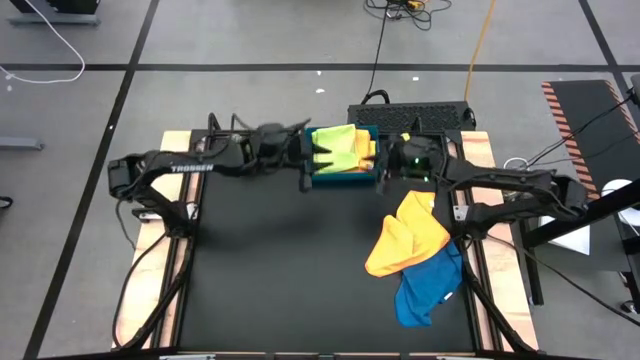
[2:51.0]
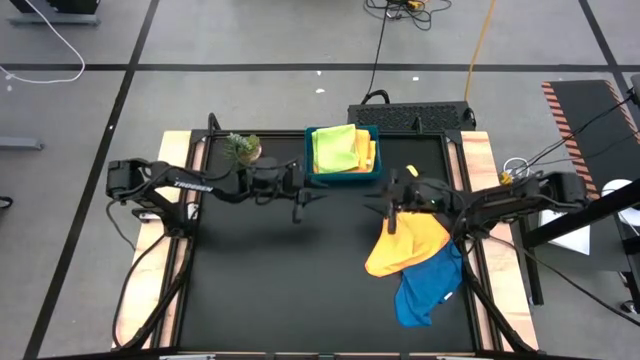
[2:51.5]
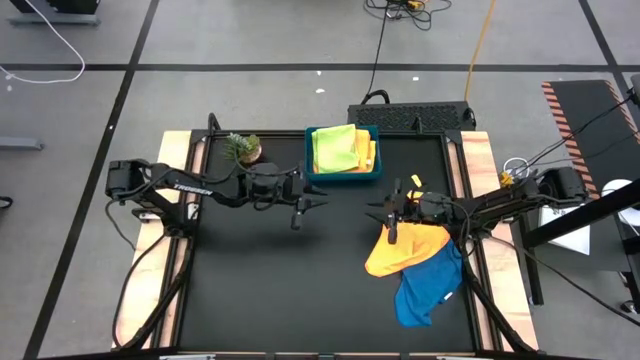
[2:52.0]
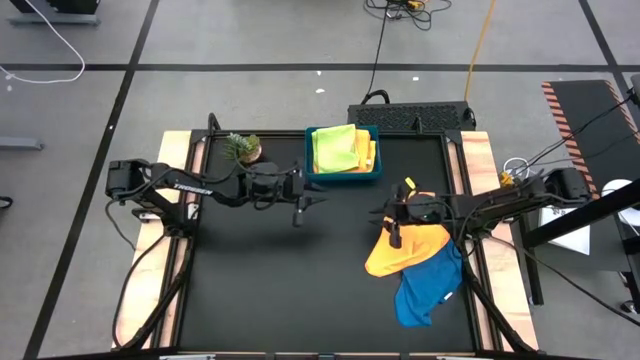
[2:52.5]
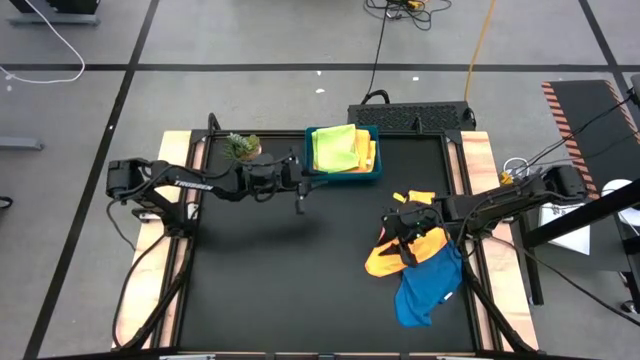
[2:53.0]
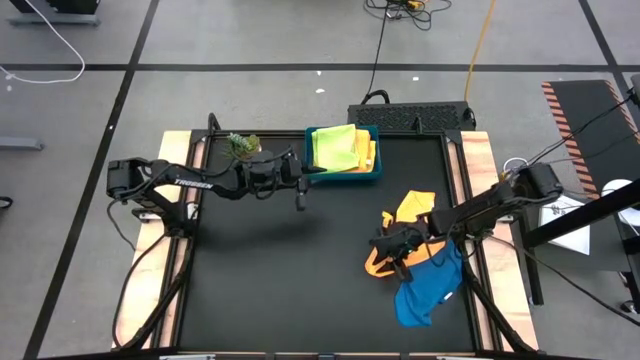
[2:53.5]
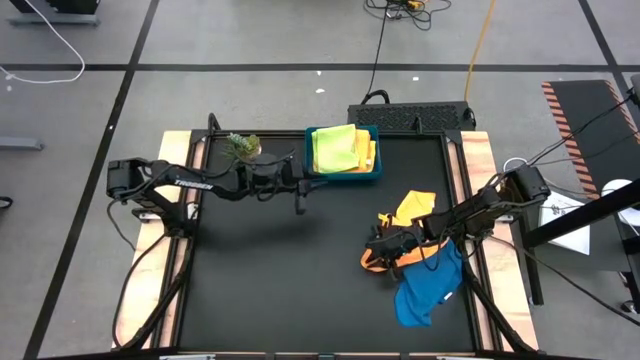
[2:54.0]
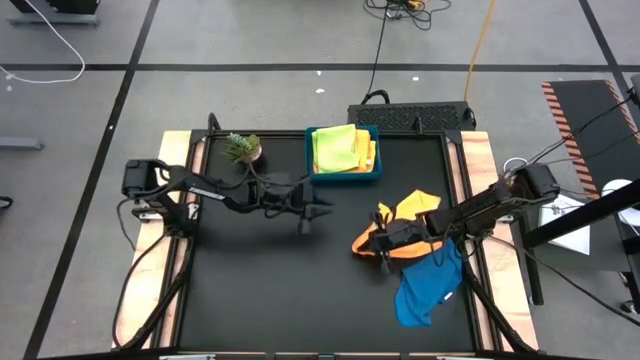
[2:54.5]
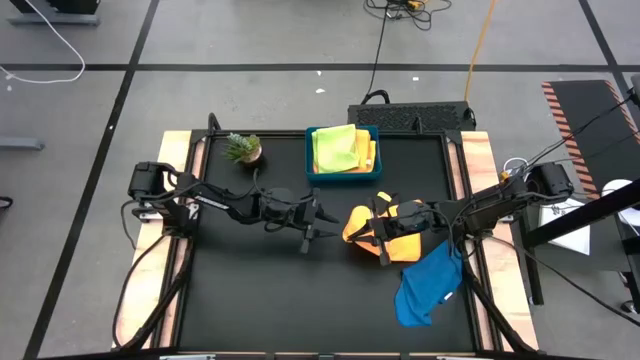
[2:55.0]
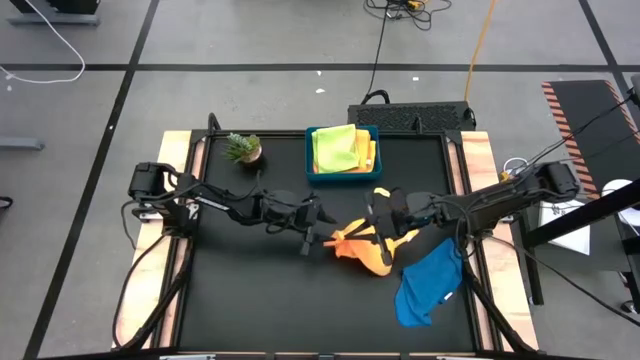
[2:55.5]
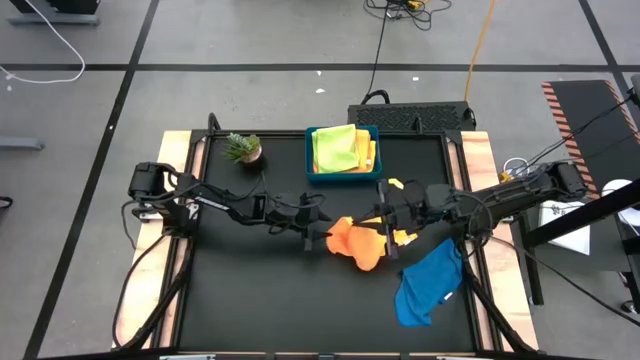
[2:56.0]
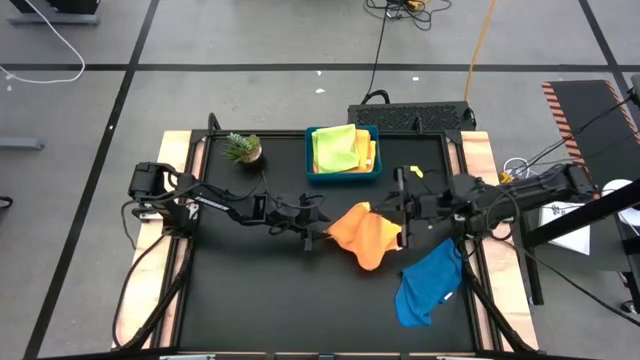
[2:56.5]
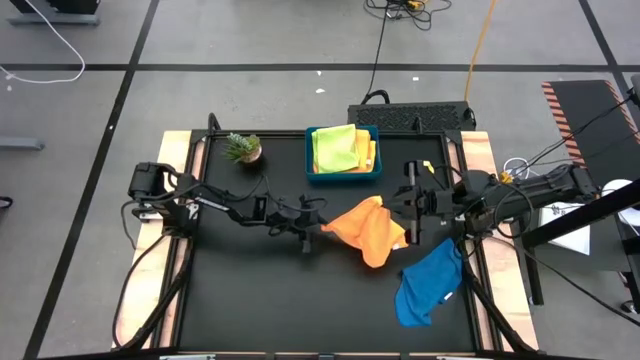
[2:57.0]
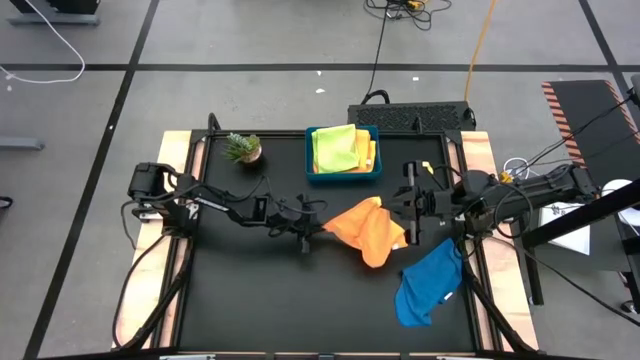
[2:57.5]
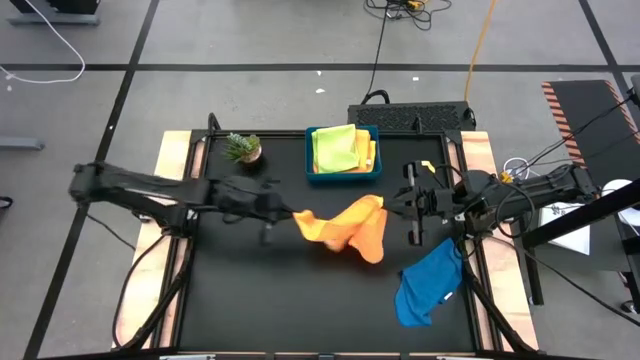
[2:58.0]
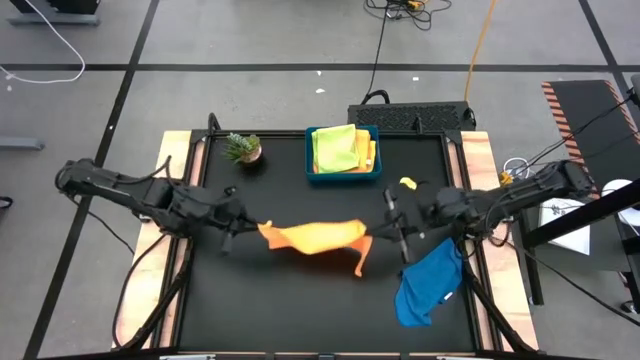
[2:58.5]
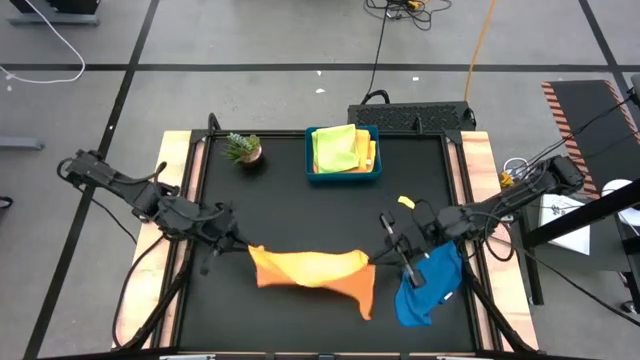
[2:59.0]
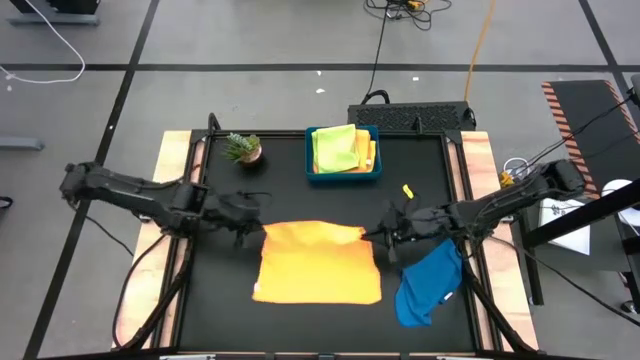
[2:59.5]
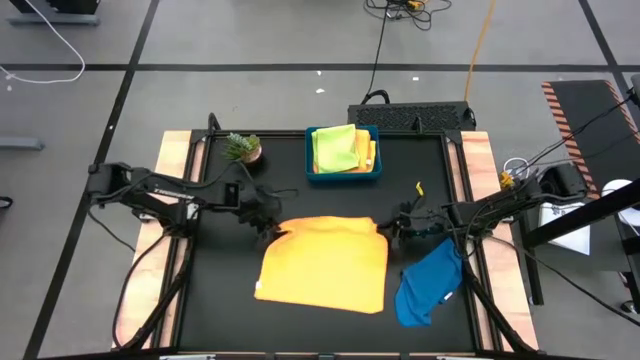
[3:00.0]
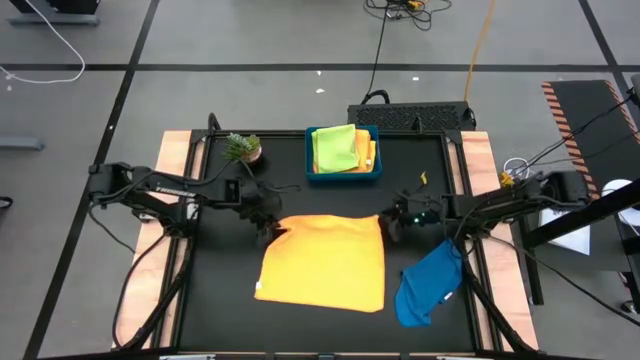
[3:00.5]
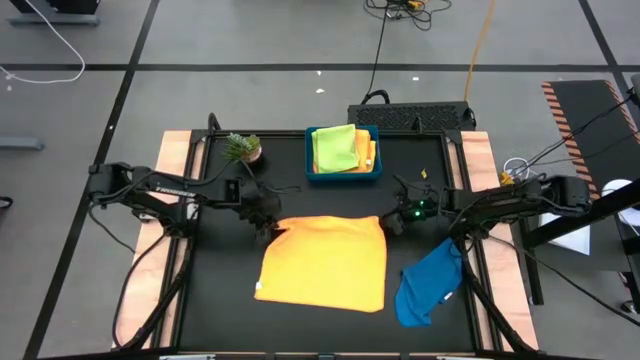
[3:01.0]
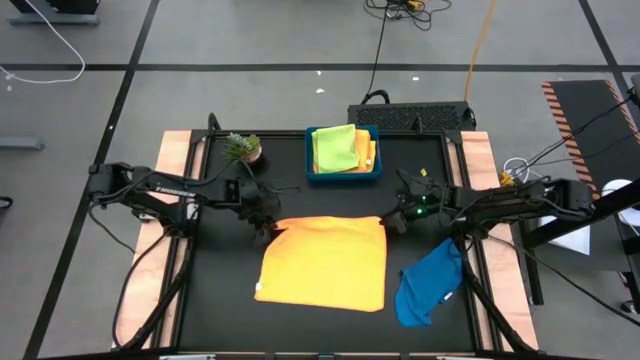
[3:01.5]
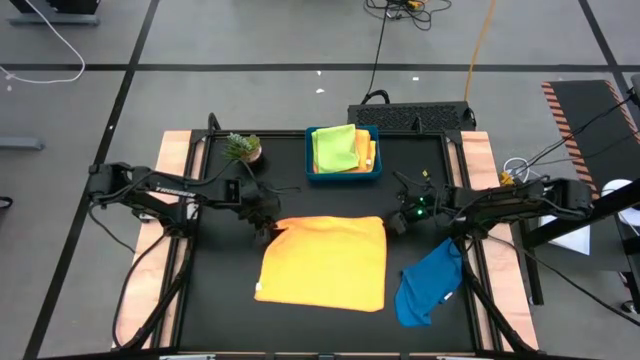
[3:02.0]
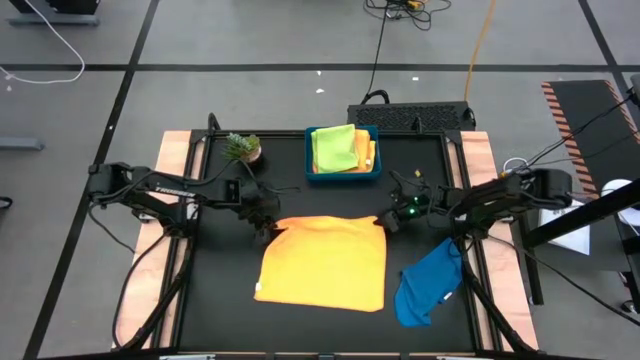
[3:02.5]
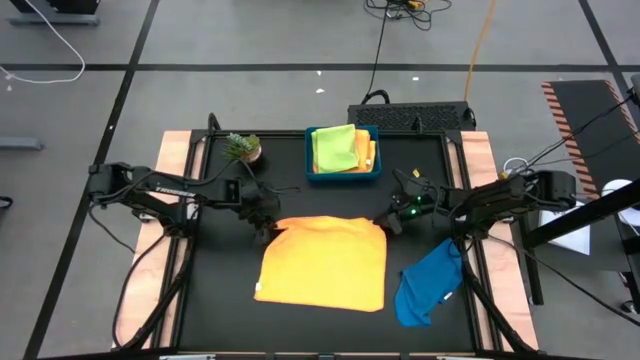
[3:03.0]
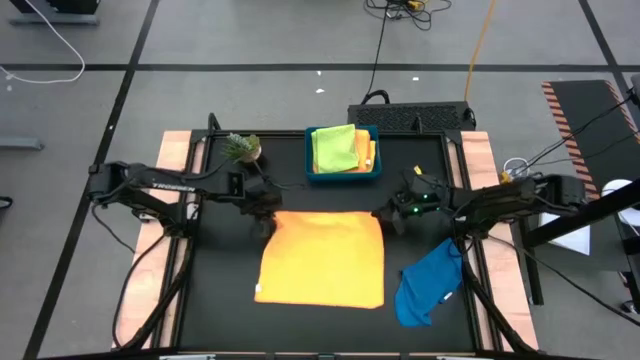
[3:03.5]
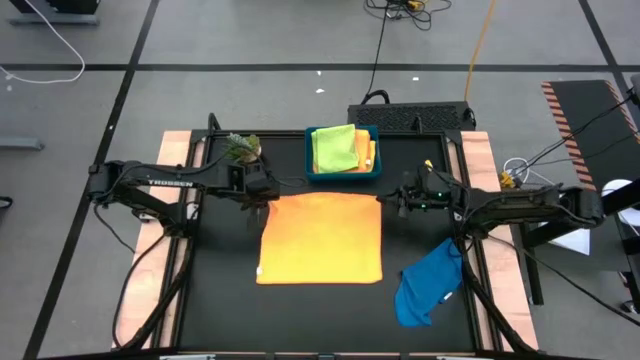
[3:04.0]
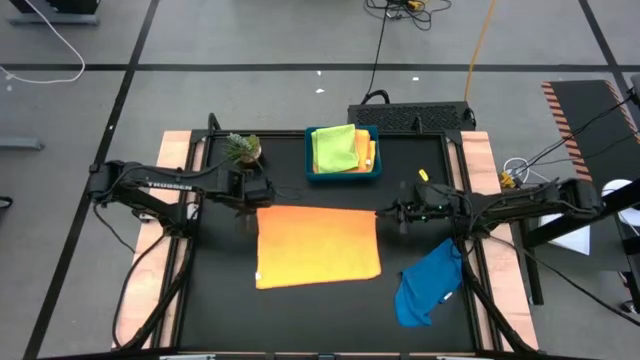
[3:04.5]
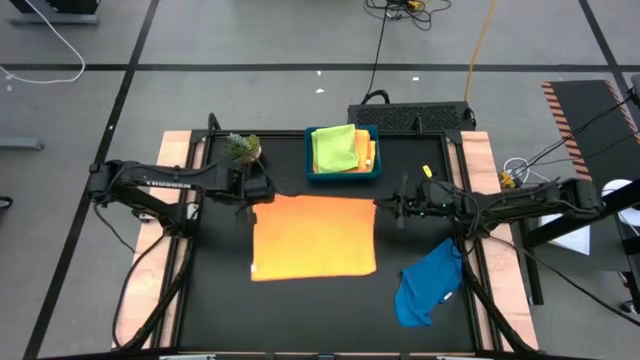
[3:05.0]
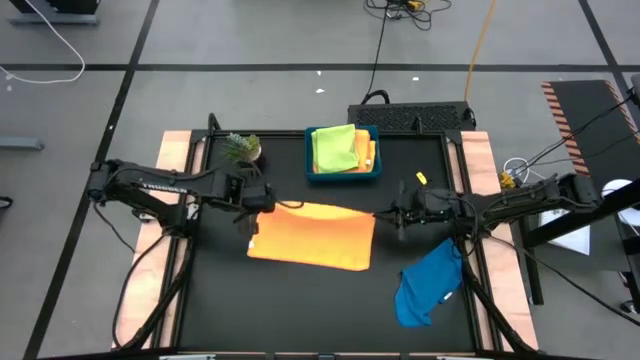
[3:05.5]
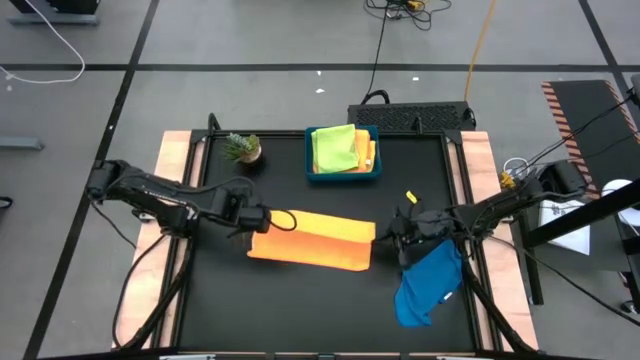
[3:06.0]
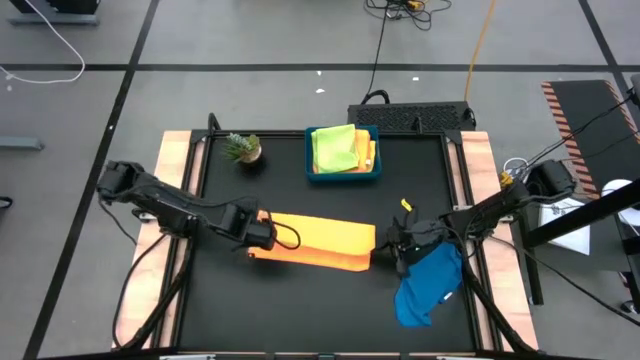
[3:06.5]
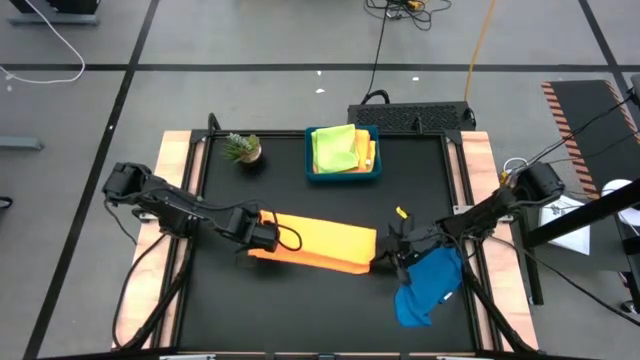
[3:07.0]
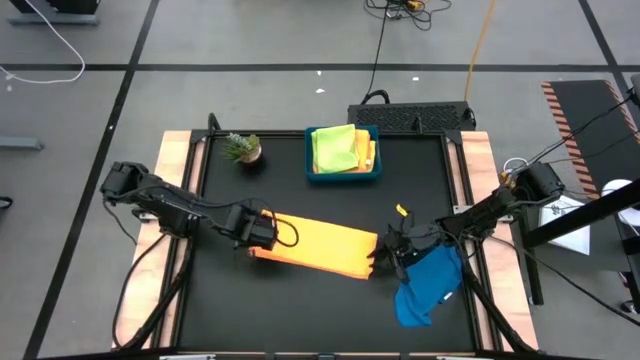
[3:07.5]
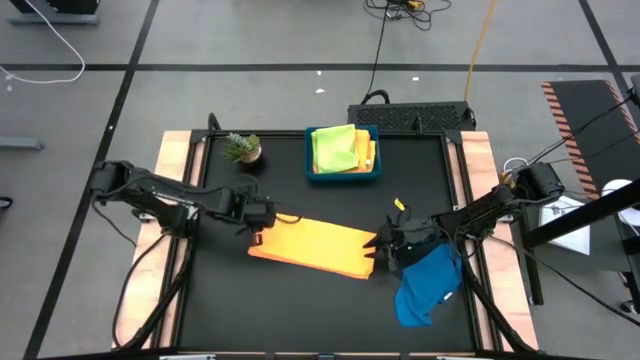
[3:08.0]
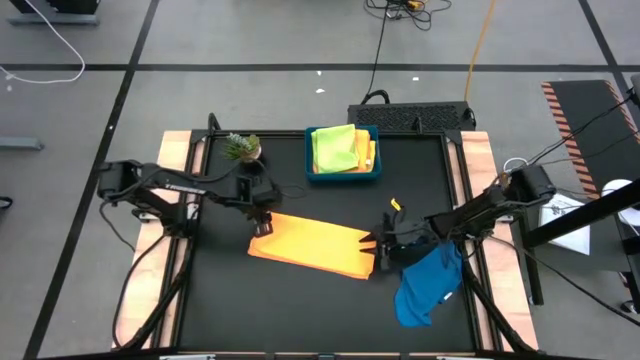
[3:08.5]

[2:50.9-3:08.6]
Task: Fold microfiber towels
Fold the orange microfiber cloth

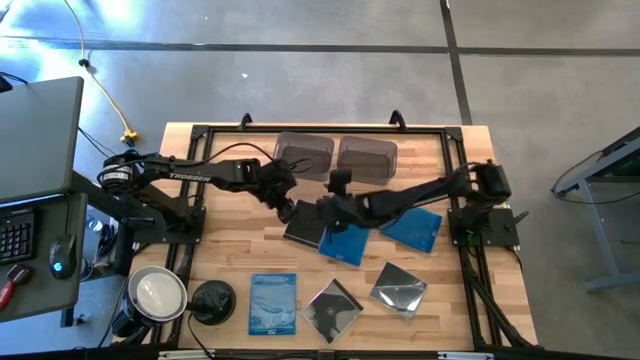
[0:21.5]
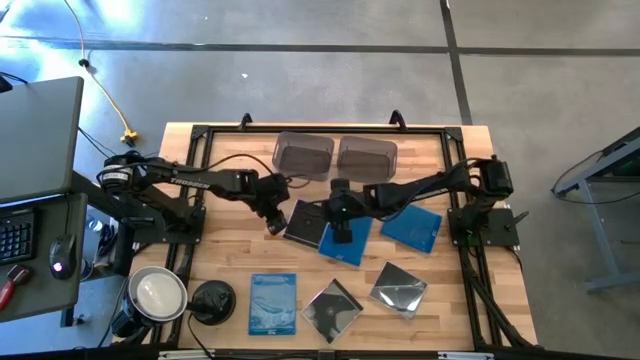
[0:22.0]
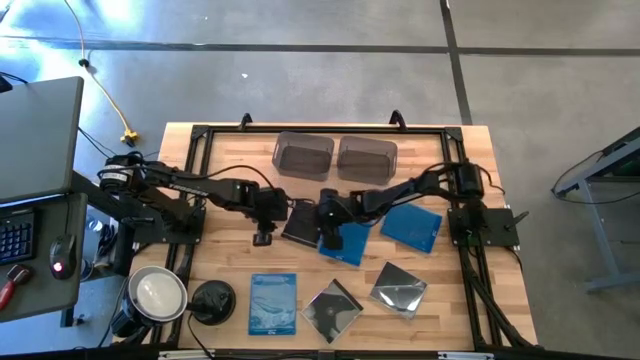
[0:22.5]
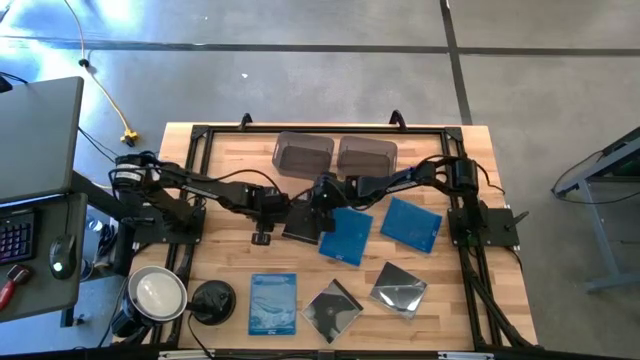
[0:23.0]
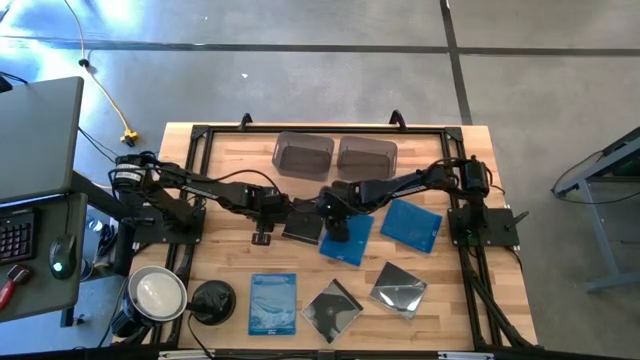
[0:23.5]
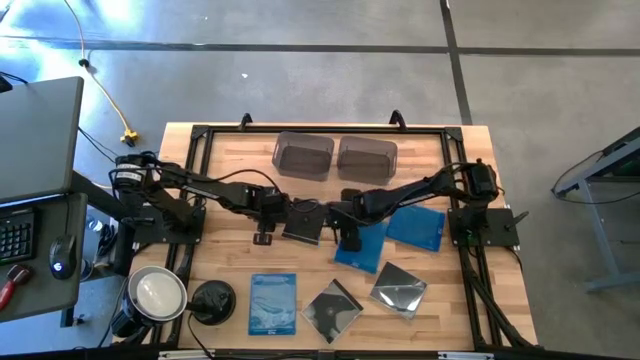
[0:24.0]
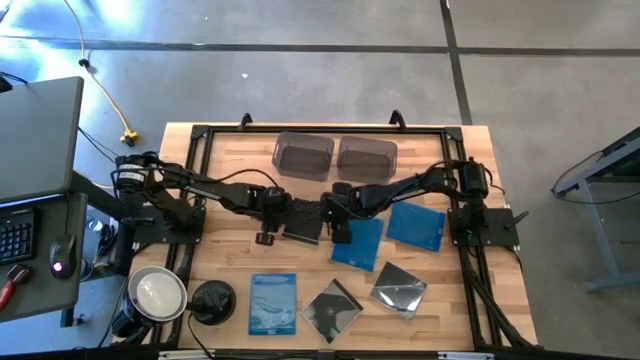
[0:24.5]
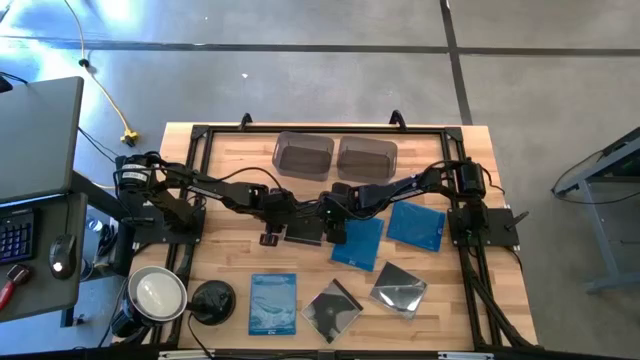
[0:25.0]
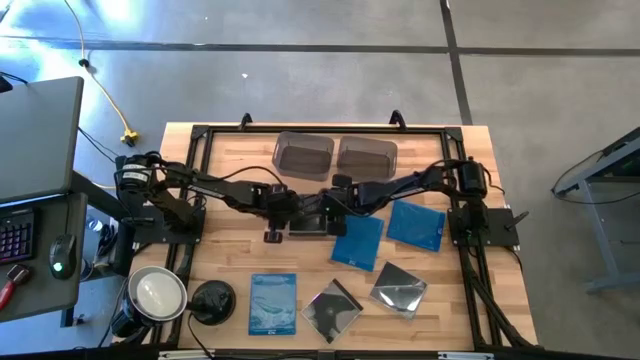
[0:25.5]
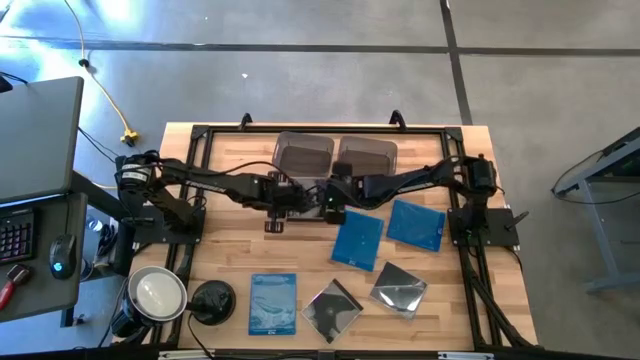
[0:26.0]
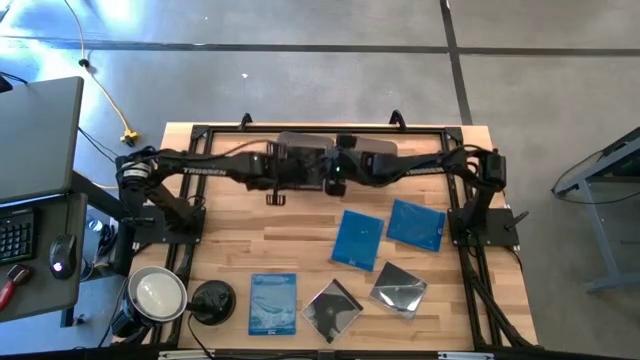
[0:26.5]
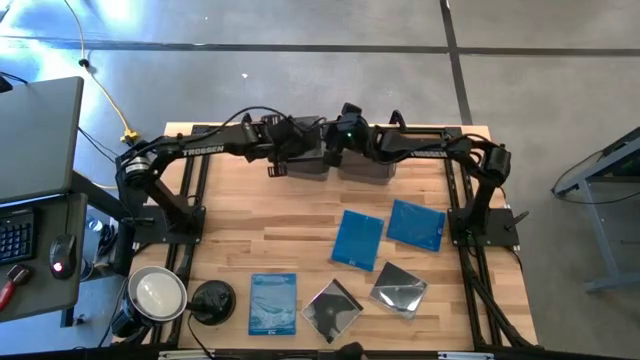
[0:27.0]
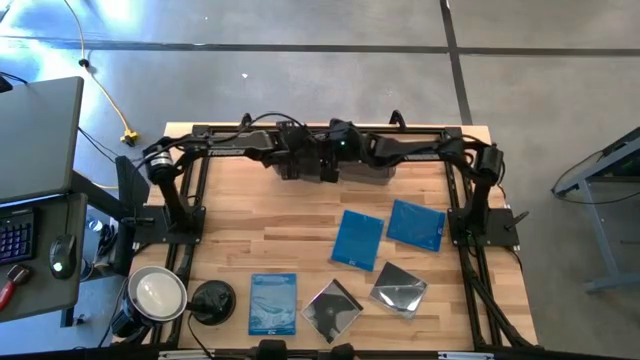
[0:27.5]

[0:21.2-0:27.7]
Task: Pick & place jewel cases by type
Put the top black cd case into the left black bin
